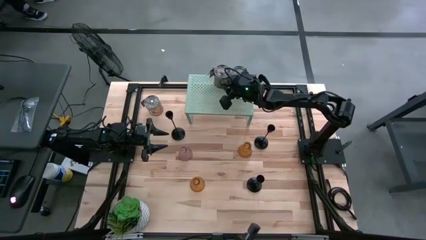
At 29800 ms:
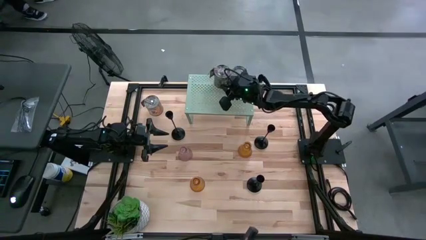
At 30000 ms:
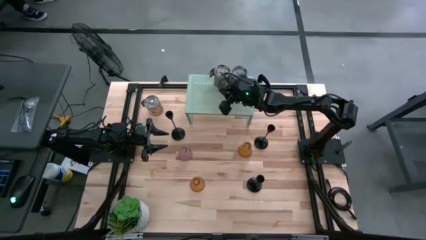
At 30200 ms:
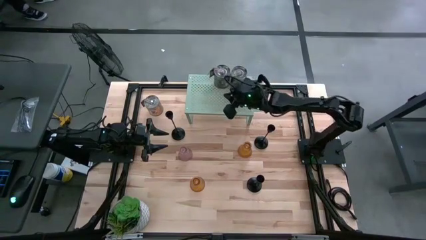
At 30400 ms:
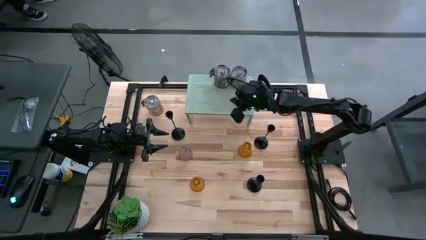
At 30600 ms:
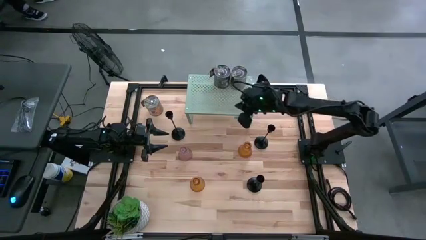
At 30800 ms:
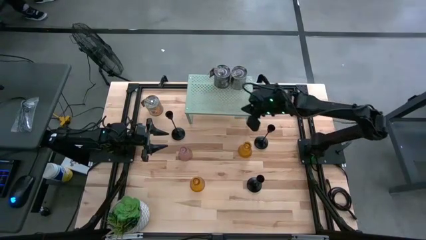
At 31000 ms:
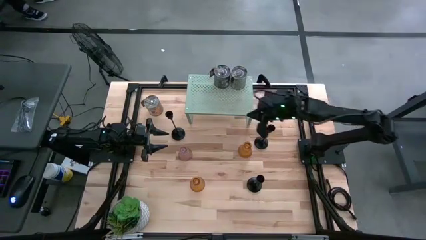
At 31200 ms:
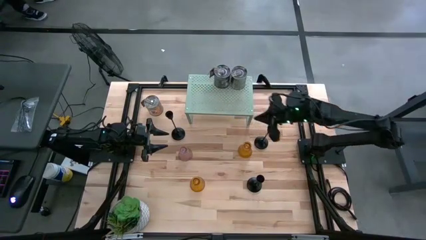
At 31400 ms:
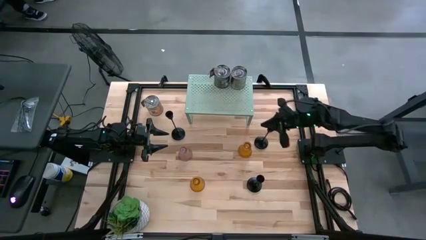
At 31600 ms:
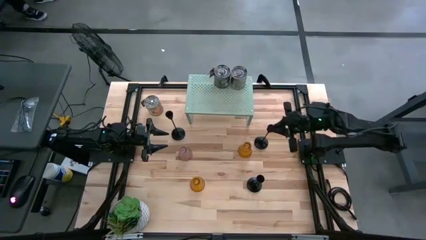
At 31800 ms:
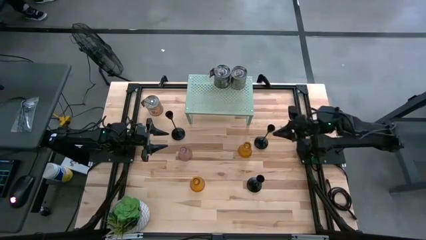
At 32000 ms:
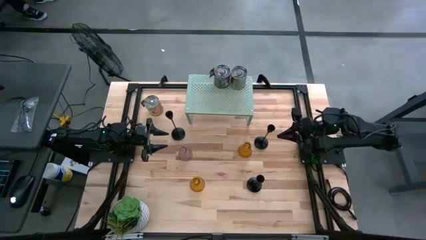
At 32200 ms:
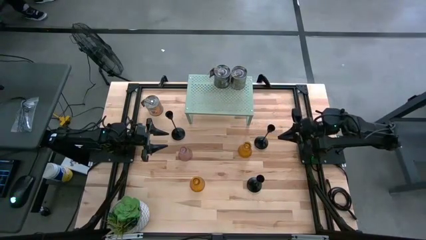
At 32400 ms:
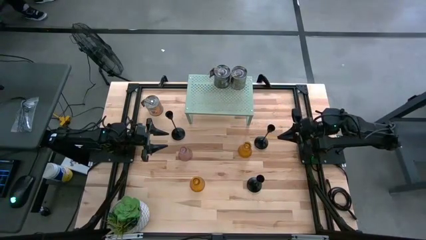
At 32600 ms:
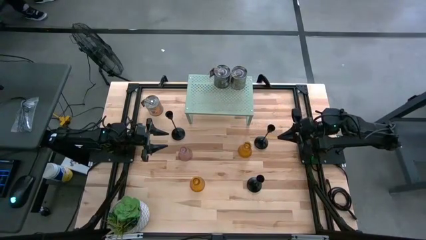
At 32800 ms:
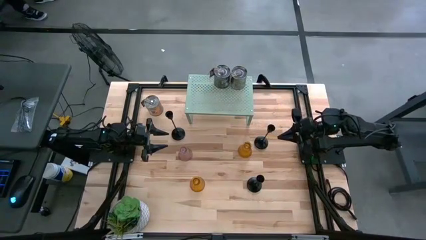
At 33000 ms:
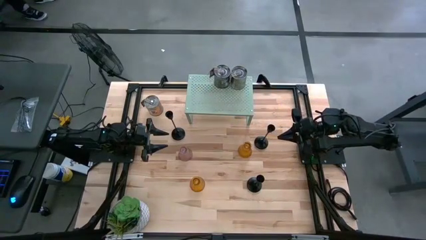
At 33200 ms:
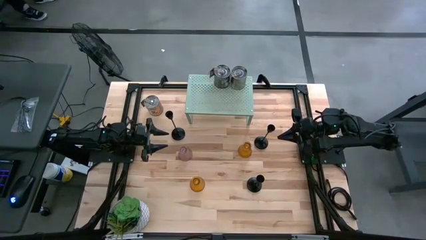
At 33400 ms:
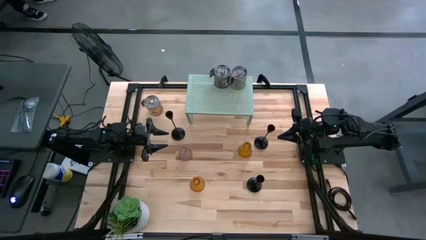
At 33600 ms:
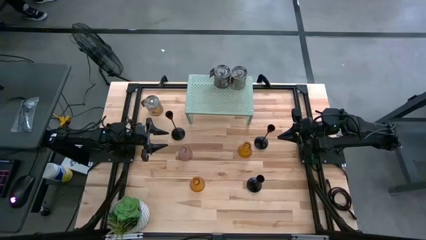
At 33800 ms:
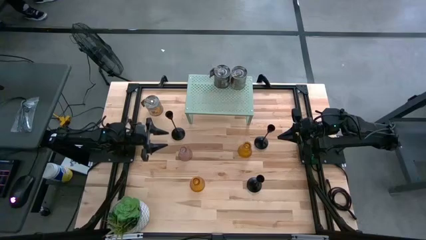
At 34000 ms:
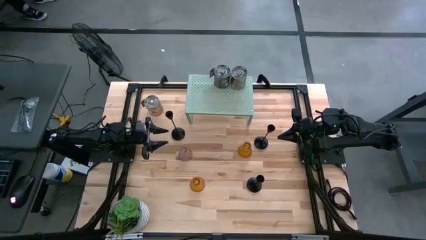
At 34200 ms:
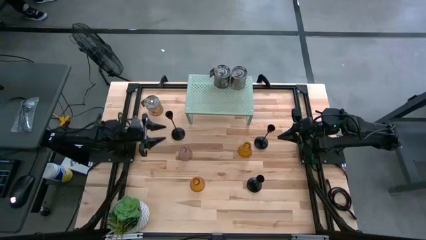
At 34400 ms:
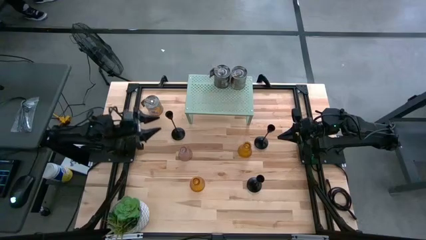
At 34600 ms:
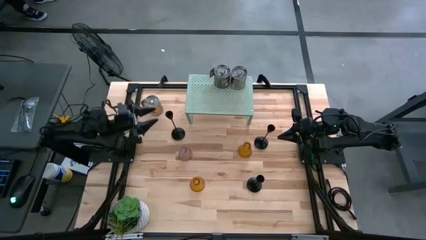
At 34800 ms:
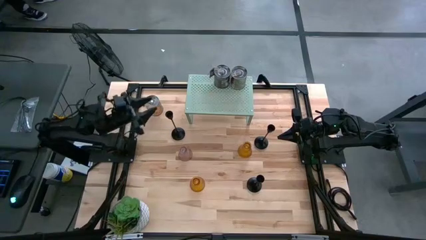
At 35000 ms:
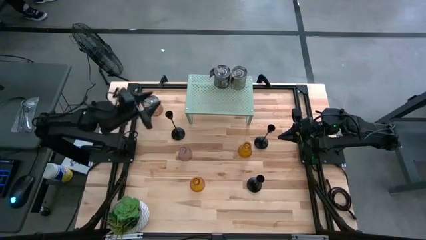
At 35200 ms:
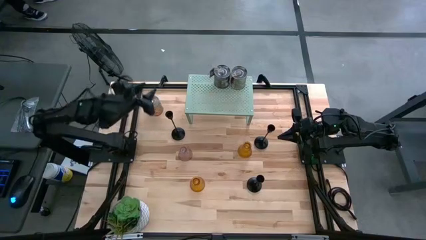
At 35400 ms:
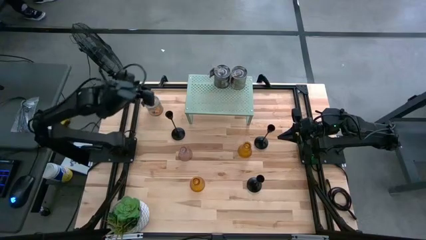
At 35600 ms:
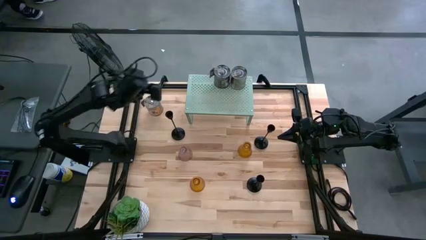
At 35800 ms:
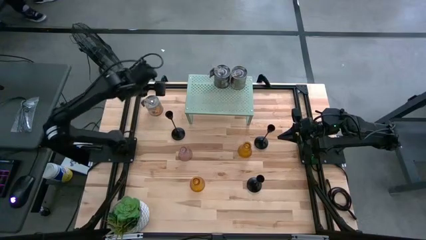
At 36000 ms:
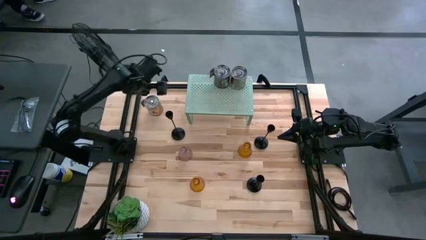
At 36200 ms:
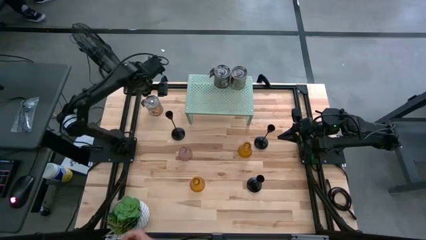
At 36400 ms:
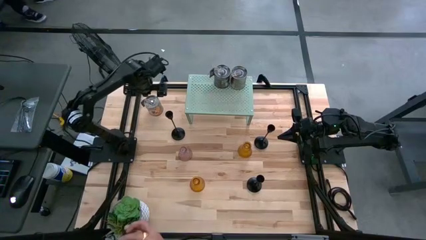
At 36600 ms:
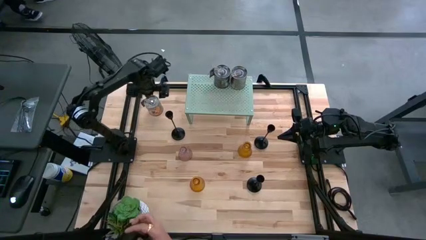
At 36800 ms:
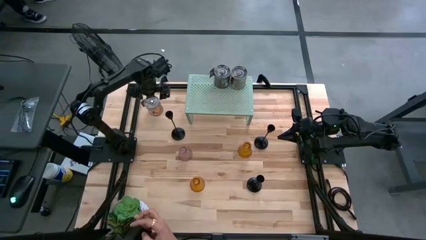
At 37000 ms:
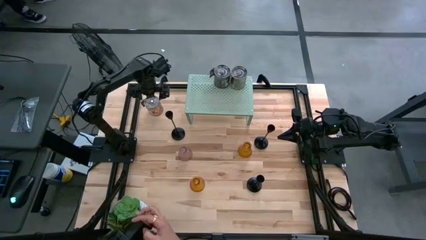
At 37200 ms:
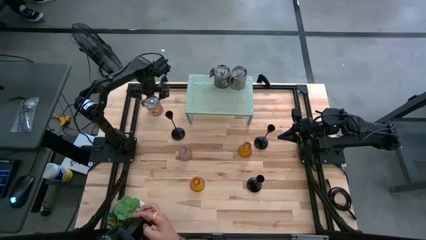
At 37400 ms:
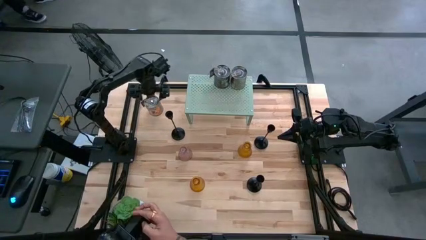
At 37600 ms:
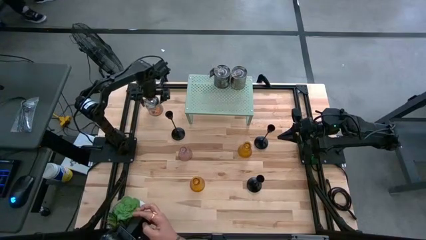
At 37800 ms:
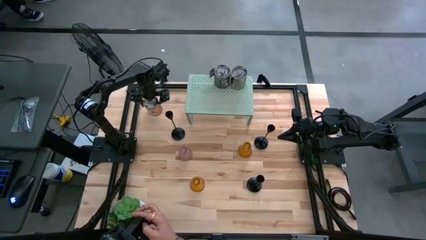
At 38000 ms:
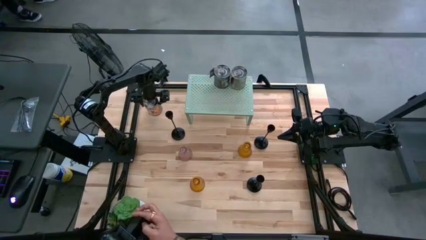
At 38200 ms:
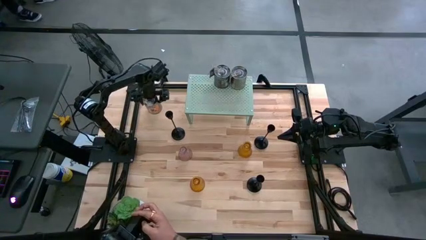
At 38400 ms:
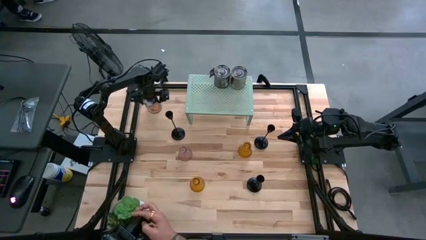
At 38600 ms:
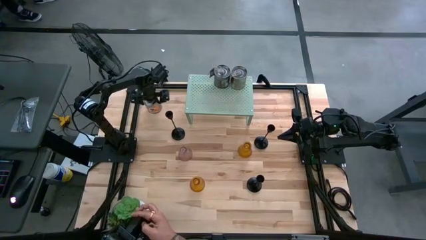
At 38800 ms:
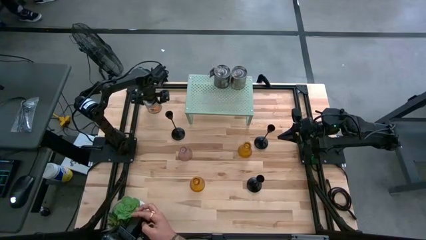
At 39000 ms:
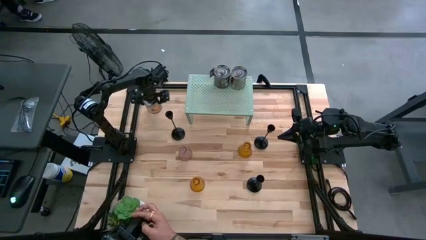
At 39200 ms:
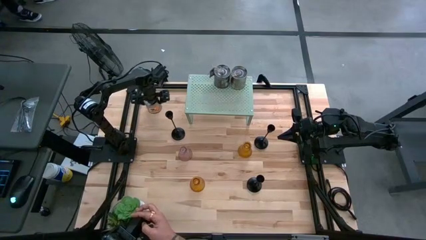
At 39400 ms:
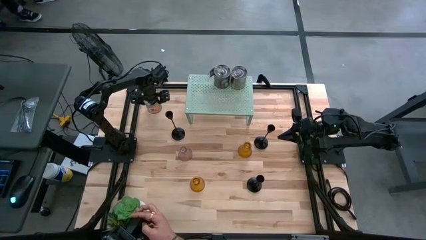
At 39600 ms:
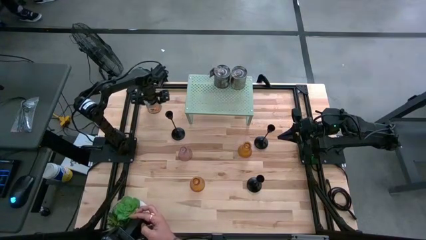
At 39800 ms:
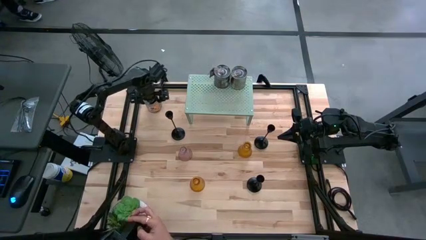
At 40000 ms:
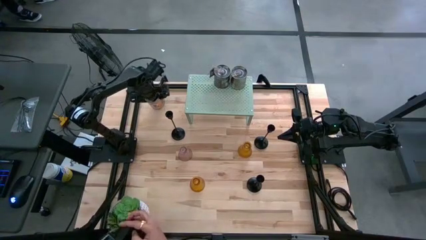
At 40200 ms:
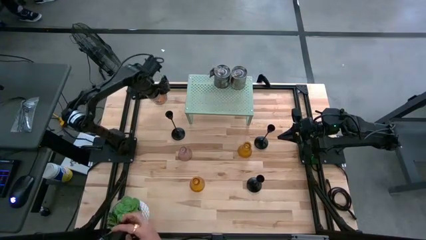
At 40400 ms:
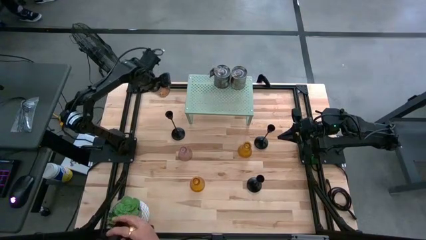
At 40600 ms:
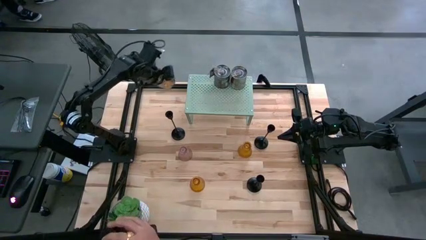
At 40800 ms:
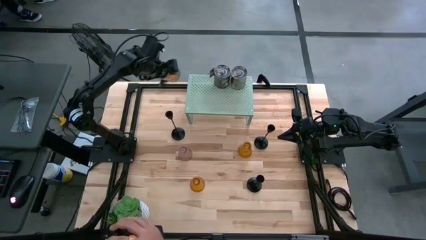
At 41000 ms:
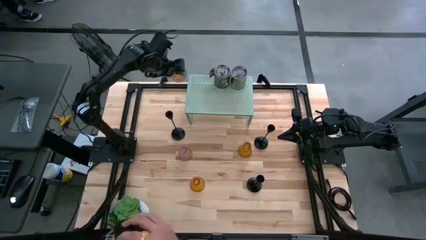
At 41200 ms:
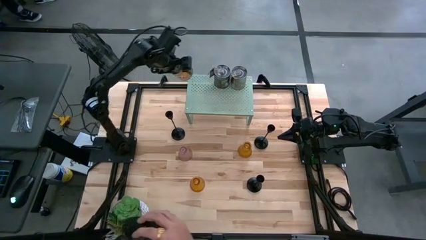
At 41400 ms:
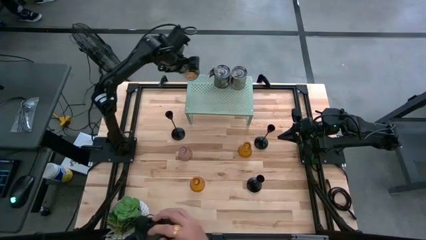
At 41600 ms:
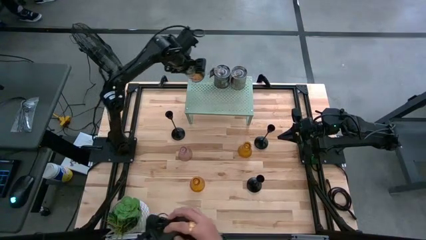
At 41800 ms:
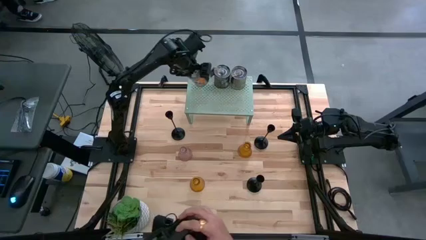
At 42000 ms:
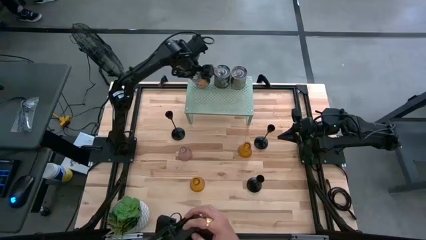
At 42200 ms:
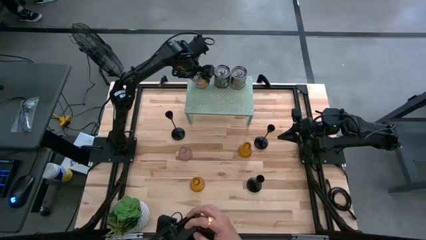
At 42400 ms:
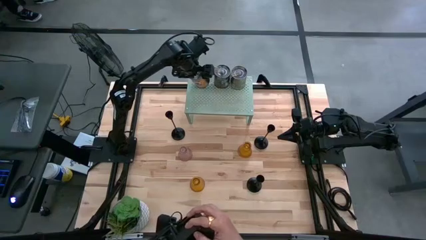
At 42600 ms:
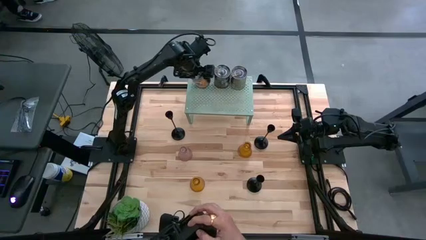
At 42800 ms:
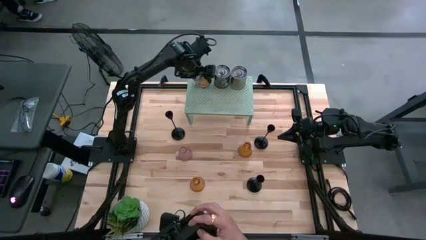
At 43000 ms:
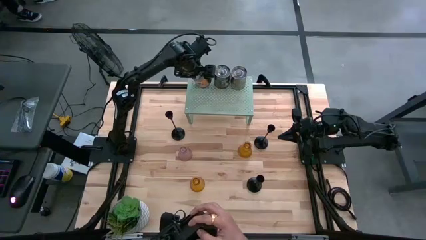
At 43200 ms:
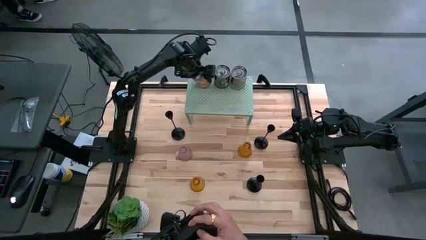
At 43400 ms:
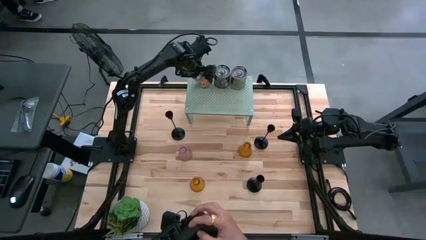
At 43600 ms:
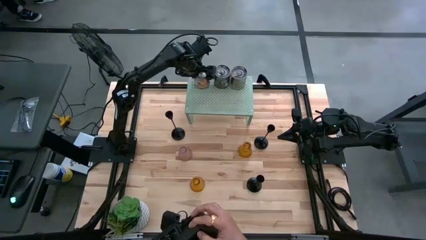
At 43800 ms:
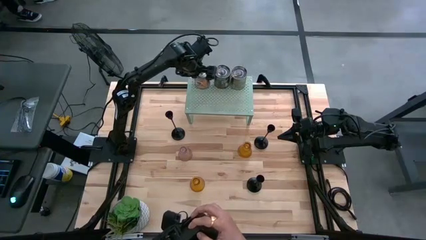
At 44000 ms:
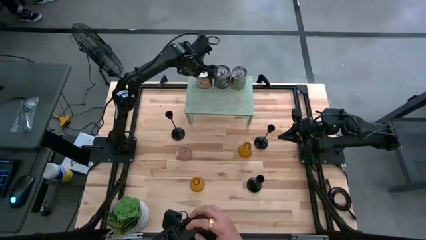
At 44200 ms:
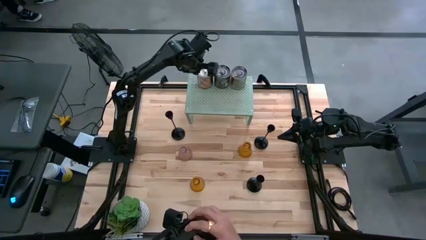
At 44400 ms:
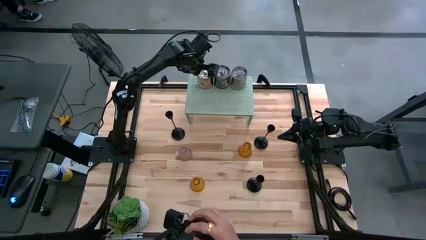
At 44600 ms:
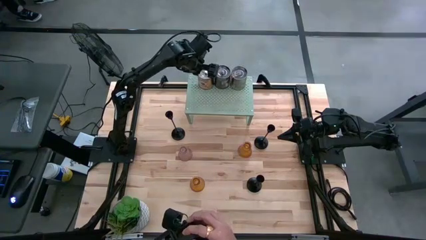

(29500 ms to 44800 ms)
Task: Pick & Place candle stick holders
Put the scented candle on the shelf
